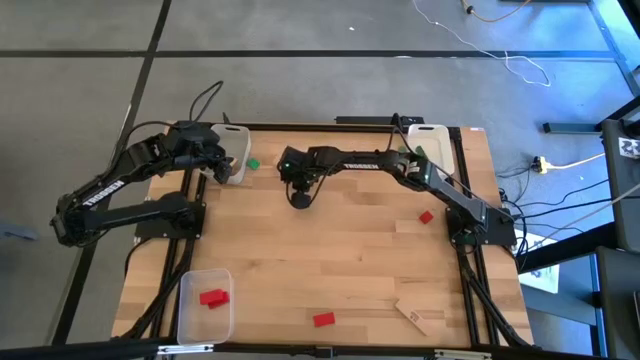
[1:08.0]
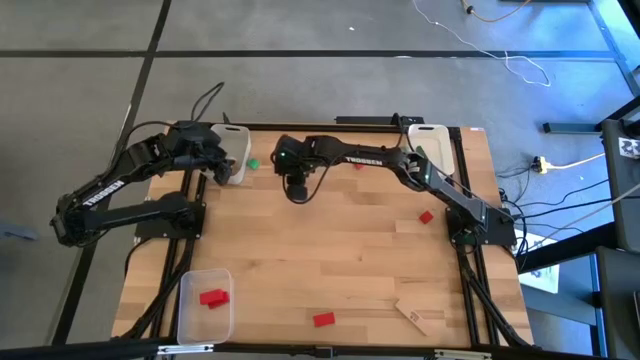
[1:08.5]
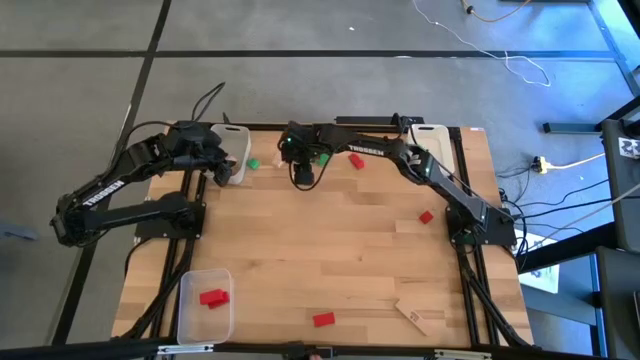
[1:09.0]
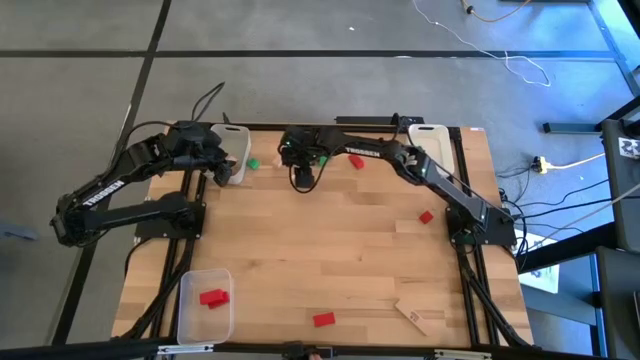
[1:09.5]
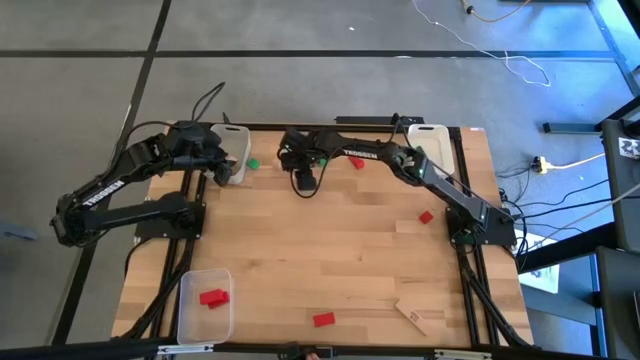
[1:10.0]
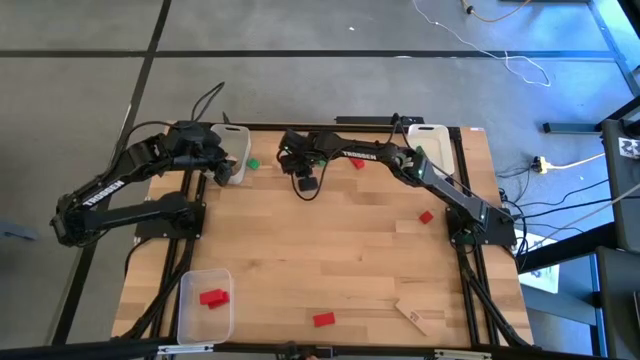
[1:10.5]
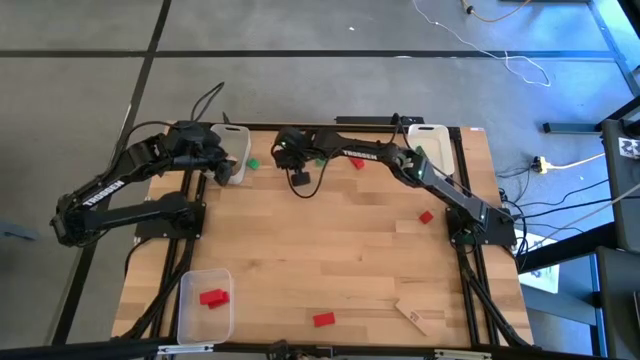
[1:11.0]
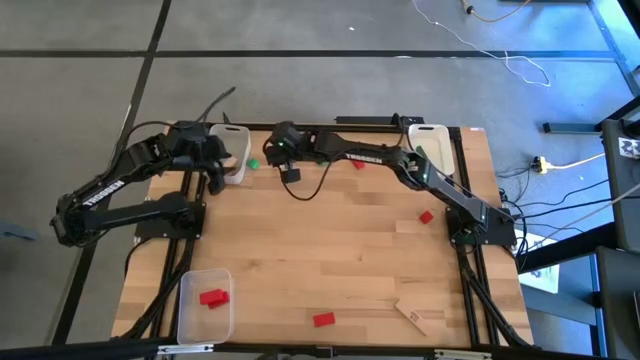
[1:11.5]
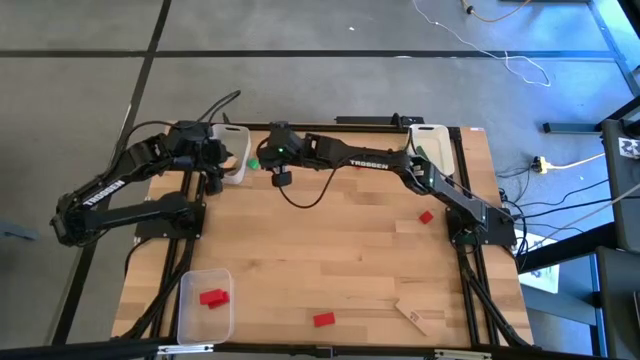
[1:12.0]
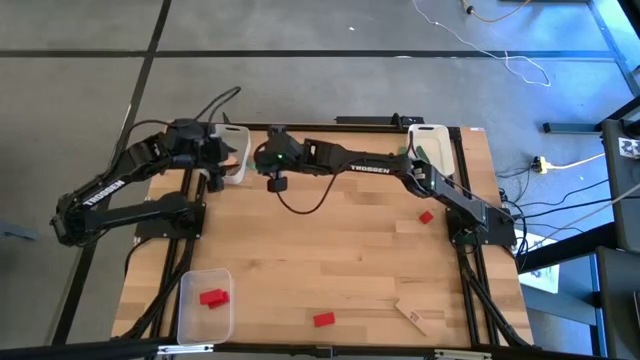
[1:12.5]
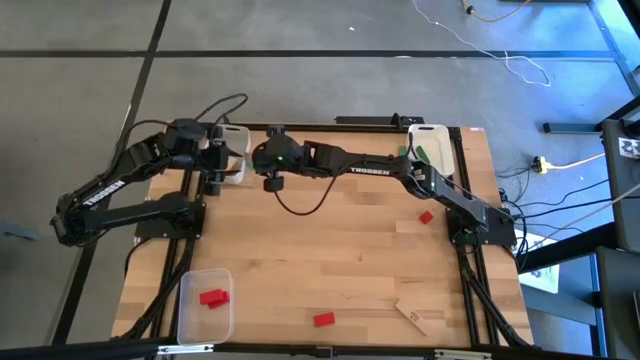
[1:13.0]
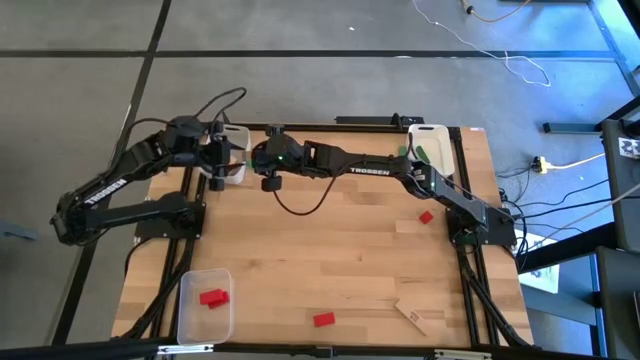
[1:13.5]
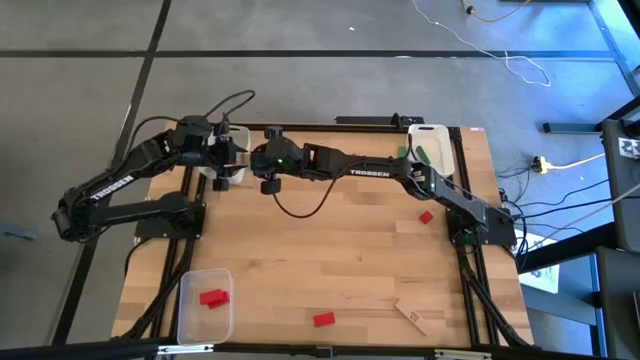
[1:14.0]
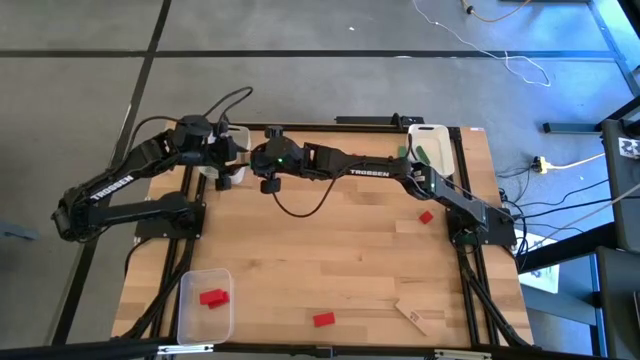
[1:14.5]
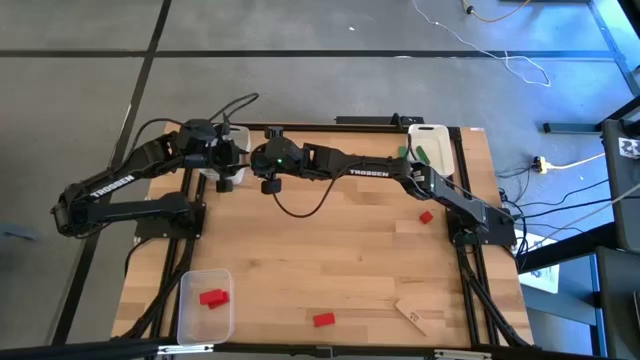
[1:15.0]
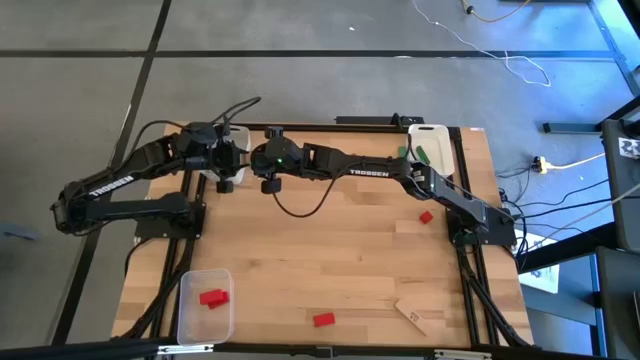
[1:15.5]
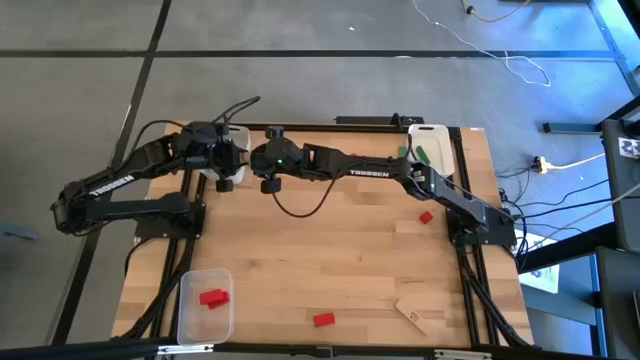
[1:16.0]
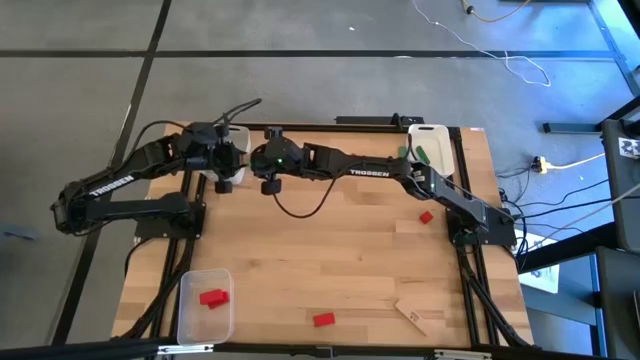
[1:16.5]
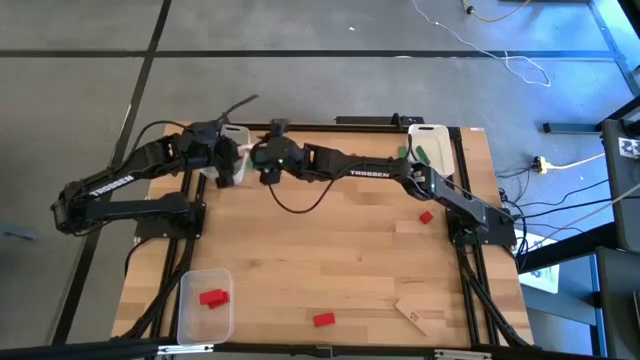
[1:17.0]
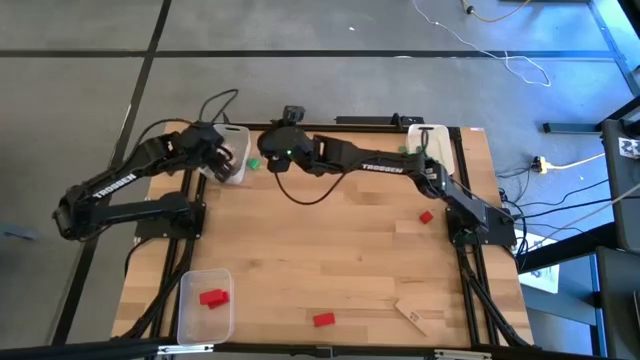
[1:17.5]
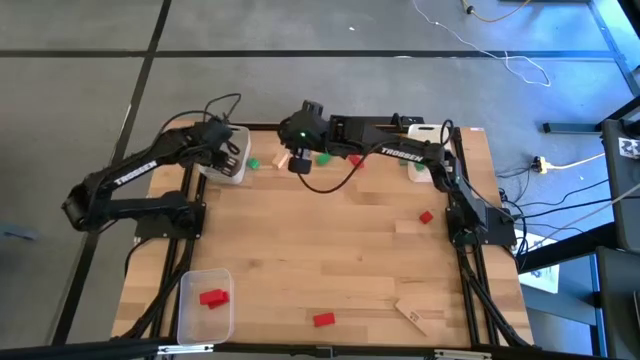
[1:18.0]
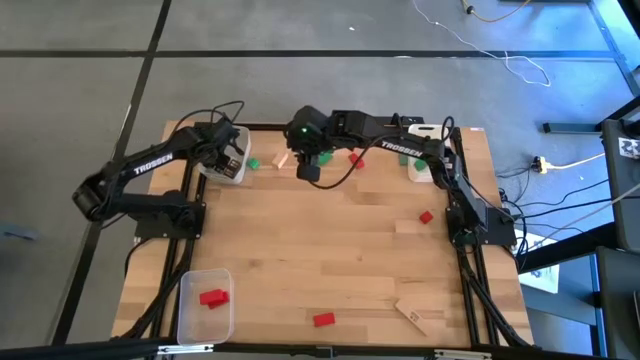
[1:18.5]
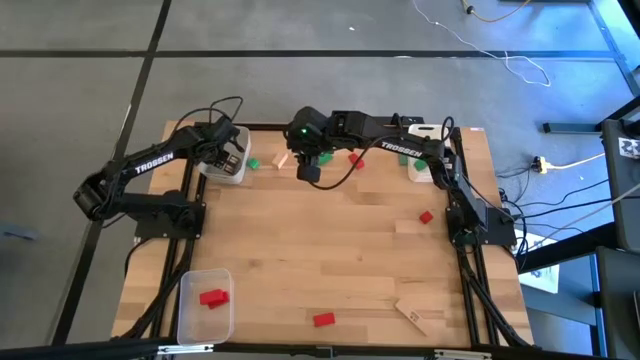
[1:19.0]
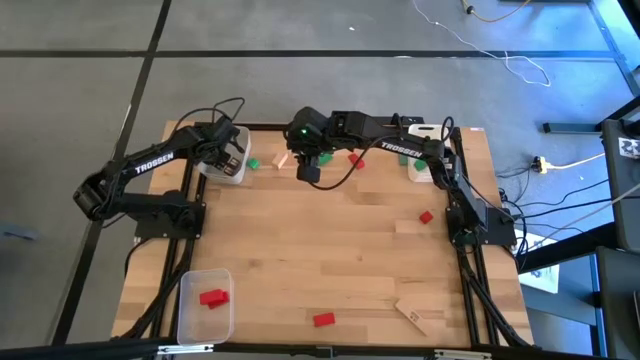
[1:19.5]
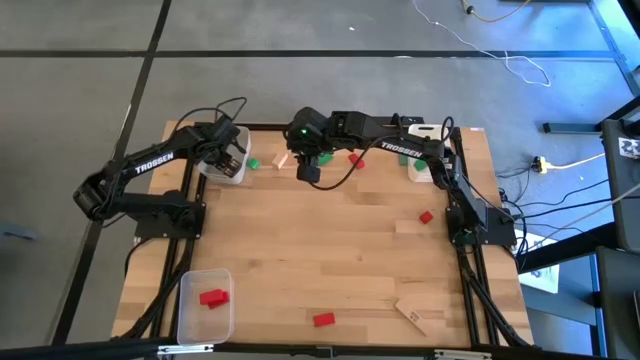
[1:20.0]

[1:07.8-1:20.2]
Task: Sort & place blocks by color
Put the brown block into the gray bin

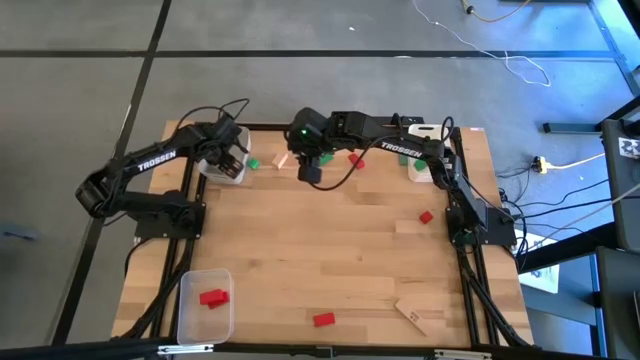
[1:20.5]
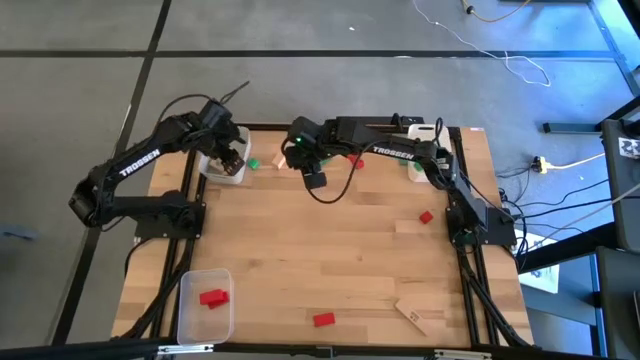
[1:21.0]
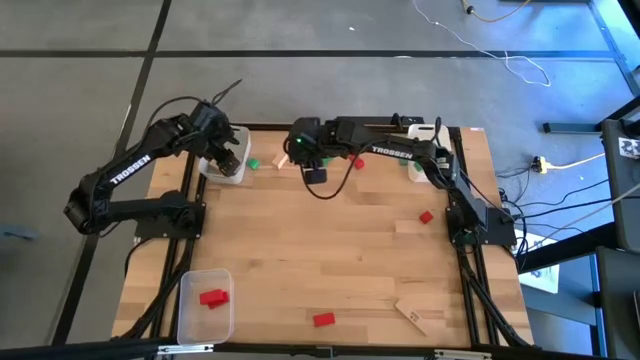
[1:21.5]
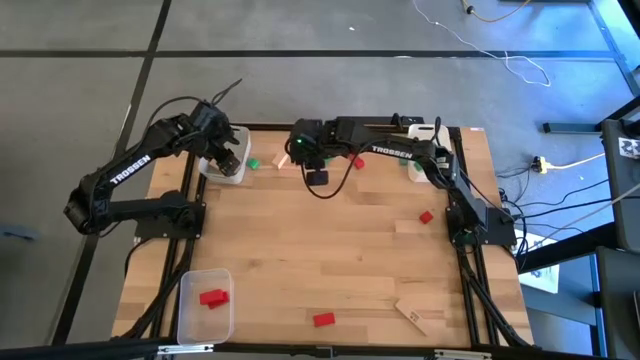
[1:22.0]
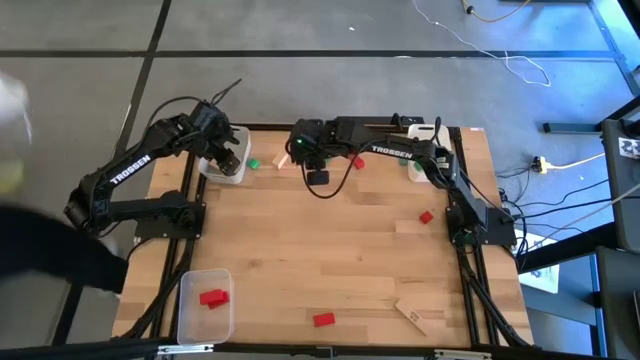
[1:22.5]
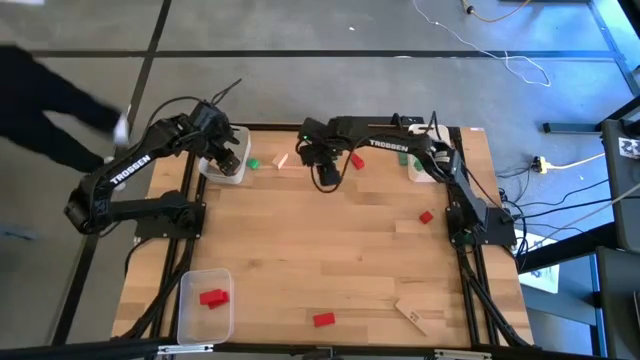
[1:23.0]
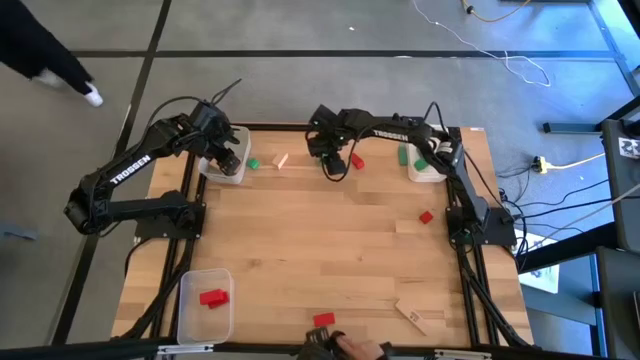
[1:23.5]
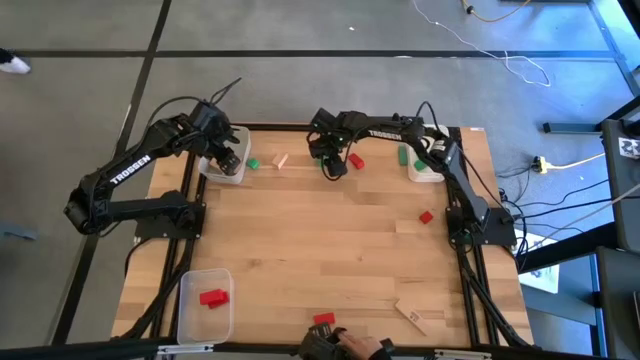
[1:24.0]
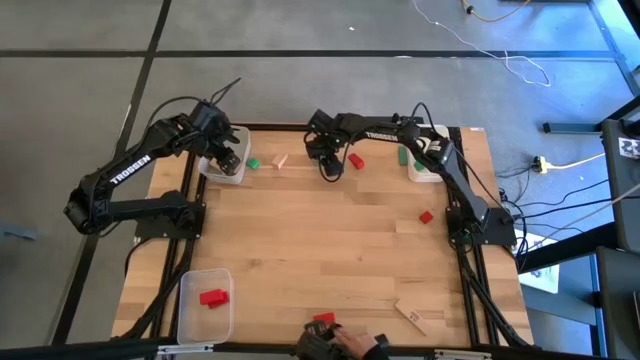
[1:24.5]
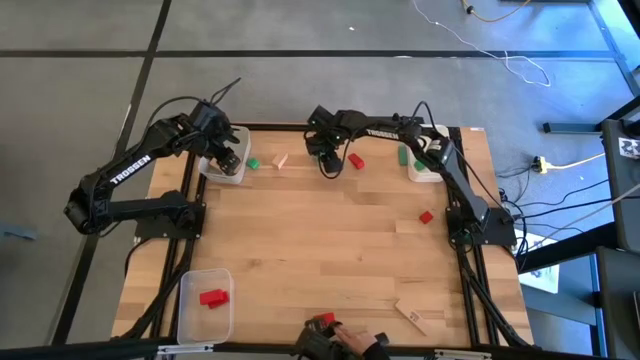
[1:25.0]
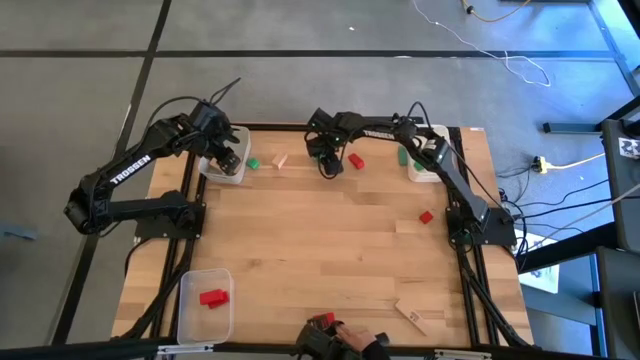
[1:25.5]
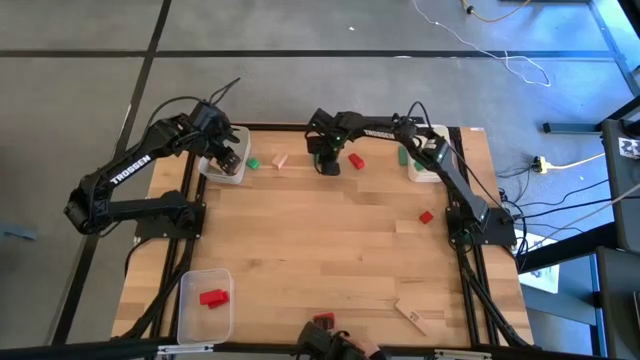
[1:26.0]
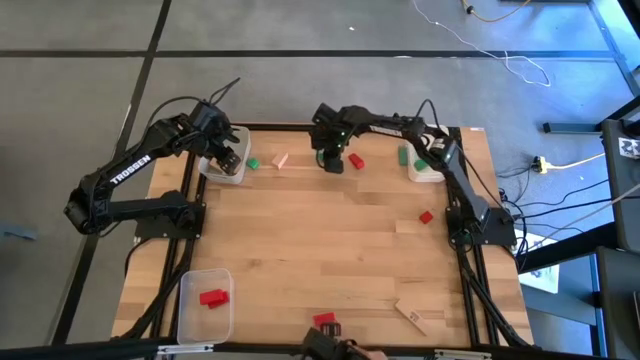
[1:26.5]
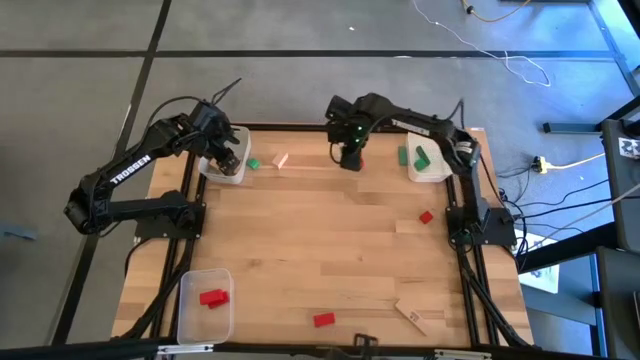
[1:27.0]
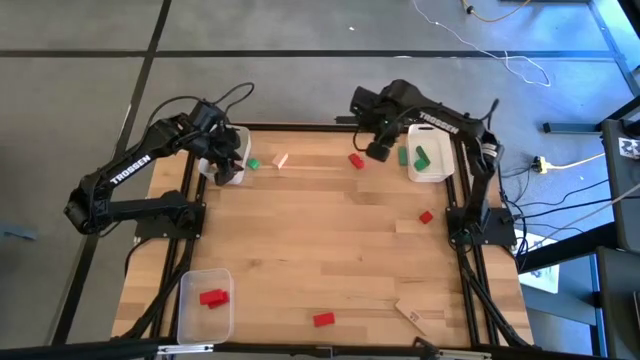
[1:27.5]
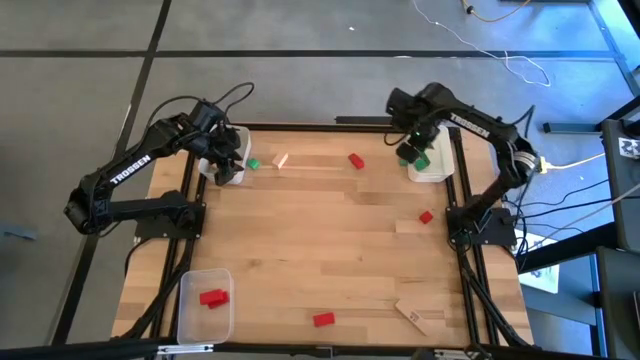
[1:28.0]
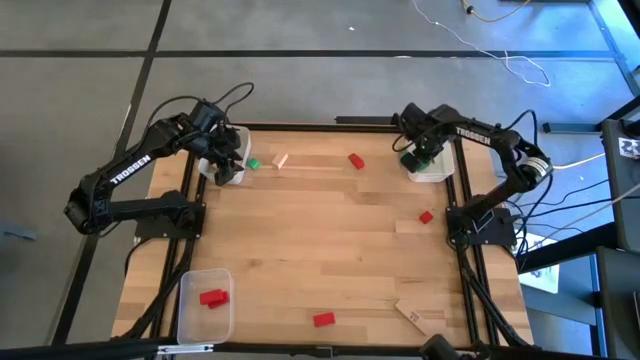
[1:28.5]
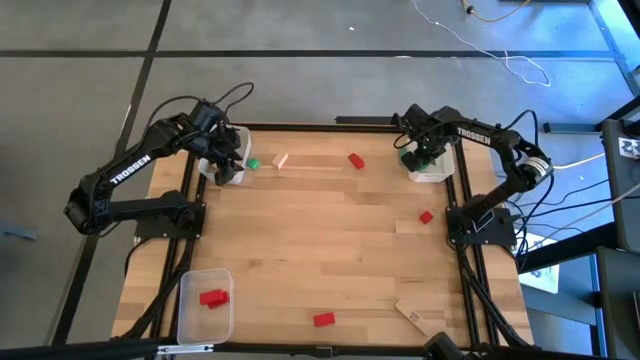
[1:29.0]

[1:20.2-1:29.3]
Put the green block into the white bin
